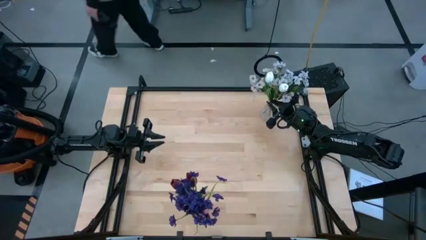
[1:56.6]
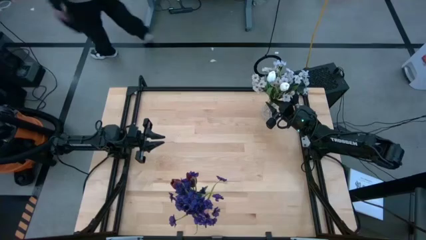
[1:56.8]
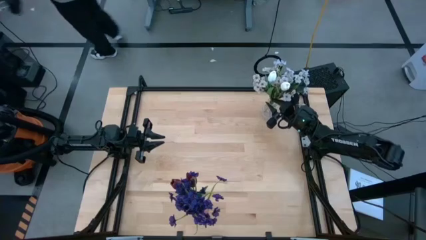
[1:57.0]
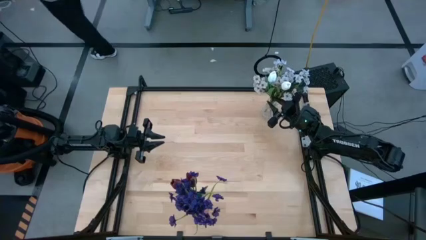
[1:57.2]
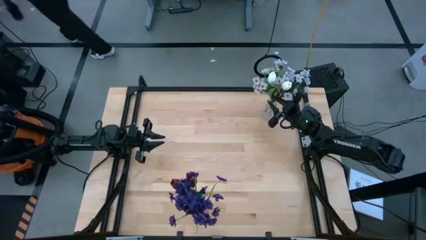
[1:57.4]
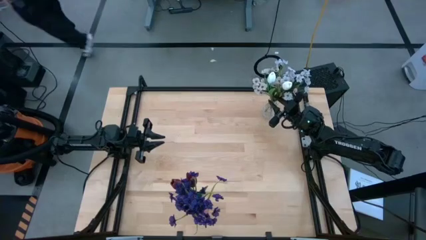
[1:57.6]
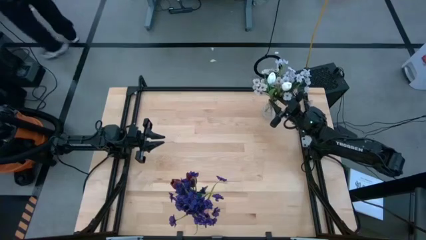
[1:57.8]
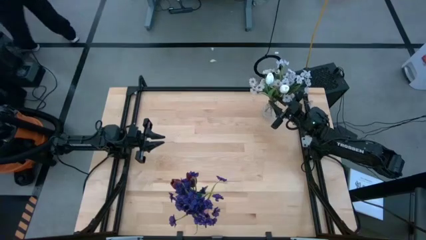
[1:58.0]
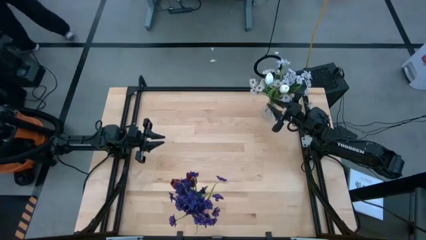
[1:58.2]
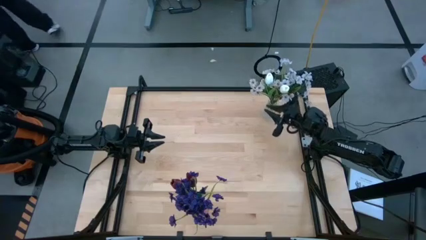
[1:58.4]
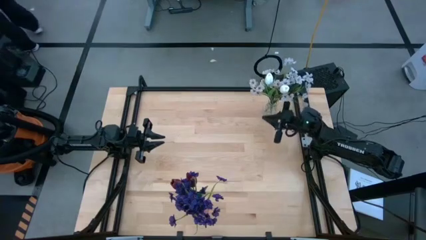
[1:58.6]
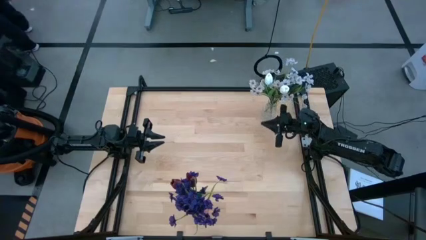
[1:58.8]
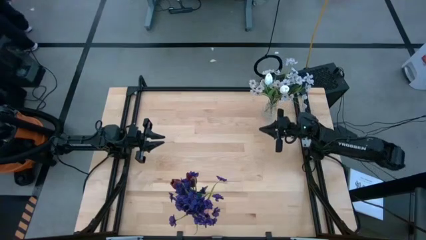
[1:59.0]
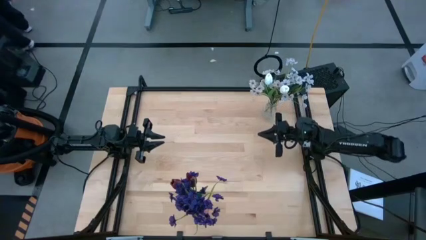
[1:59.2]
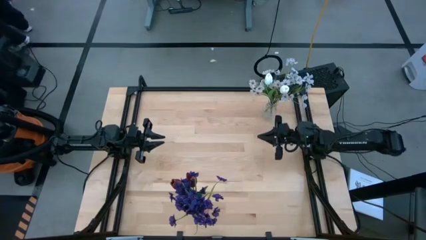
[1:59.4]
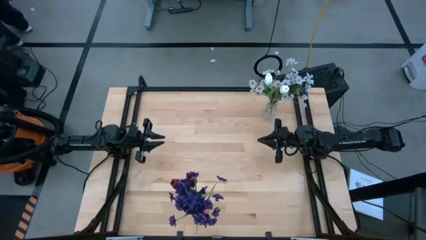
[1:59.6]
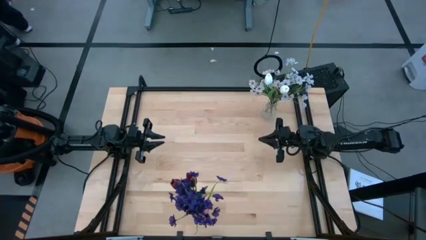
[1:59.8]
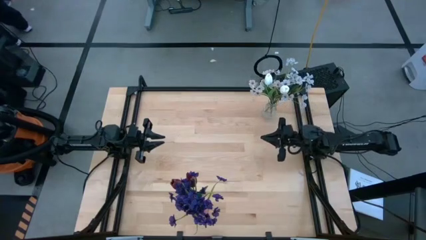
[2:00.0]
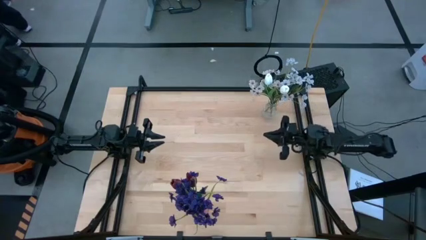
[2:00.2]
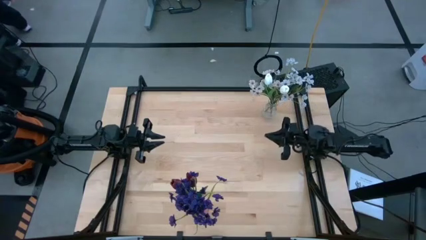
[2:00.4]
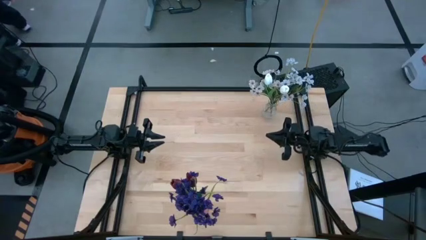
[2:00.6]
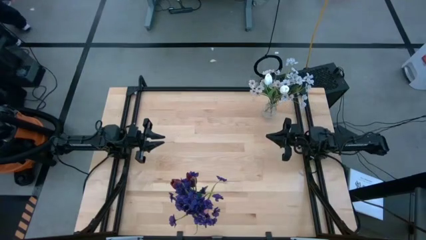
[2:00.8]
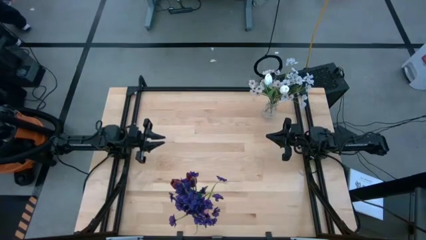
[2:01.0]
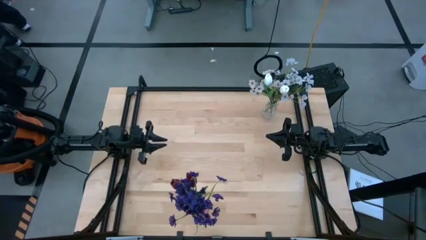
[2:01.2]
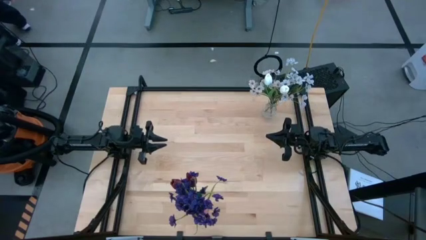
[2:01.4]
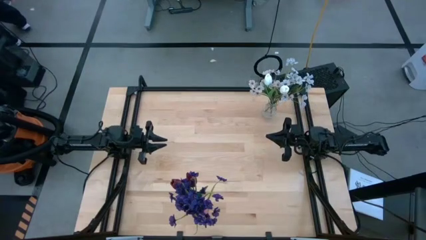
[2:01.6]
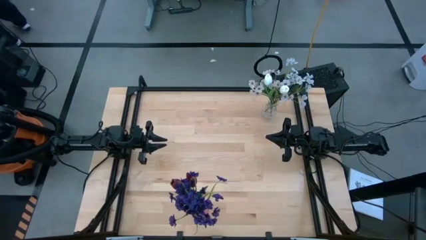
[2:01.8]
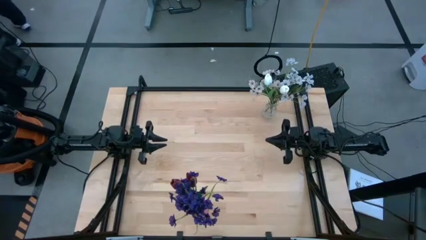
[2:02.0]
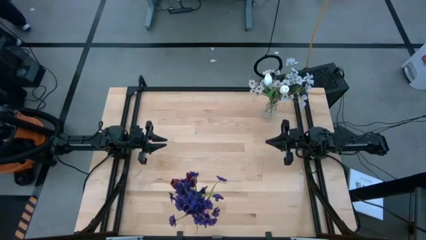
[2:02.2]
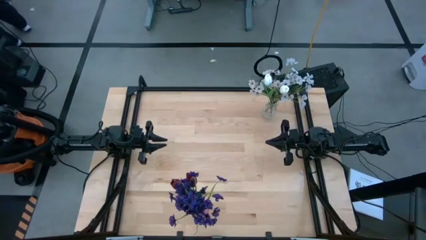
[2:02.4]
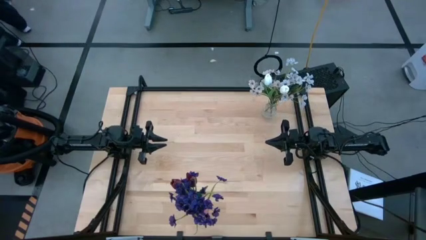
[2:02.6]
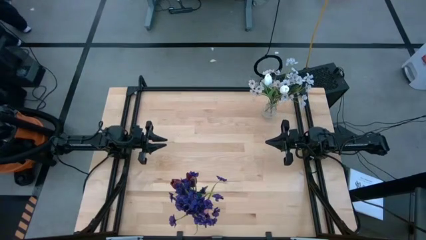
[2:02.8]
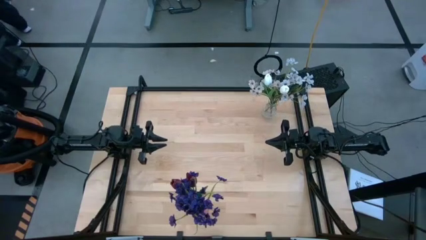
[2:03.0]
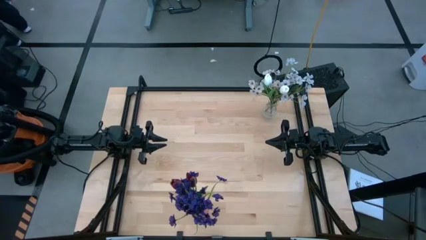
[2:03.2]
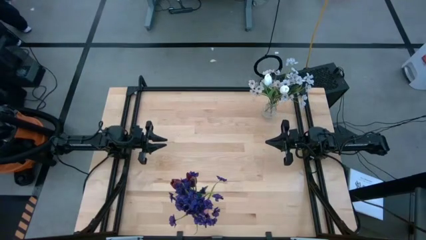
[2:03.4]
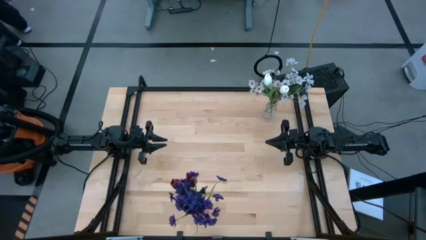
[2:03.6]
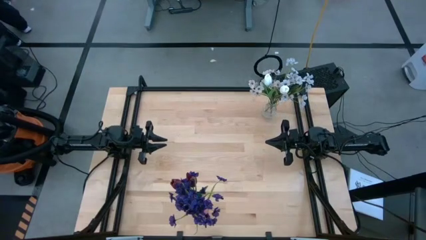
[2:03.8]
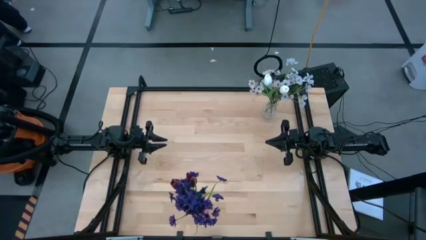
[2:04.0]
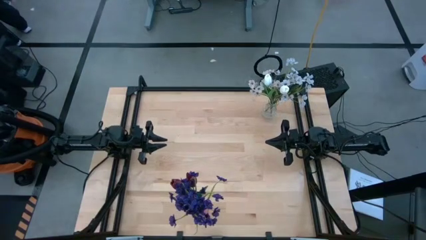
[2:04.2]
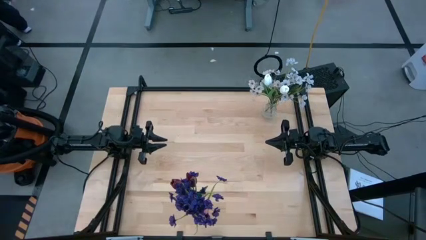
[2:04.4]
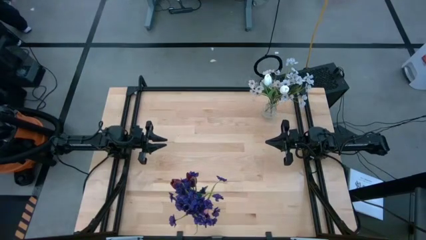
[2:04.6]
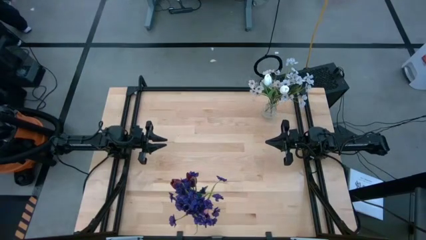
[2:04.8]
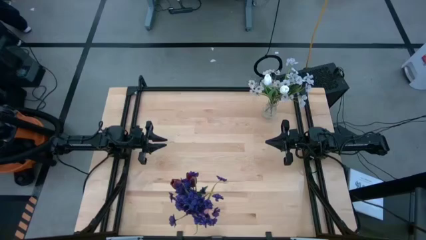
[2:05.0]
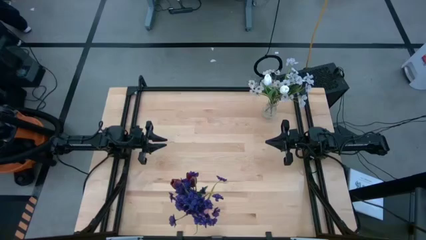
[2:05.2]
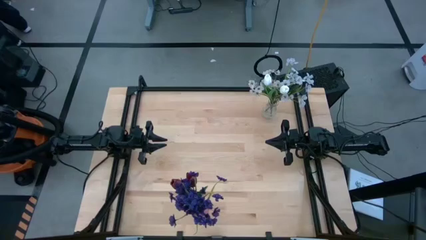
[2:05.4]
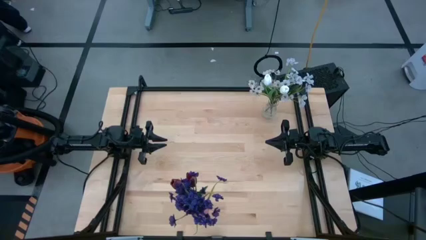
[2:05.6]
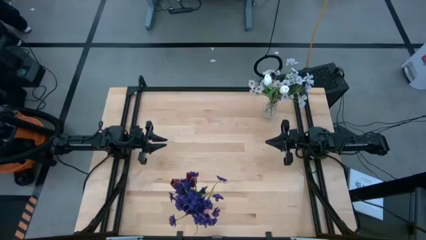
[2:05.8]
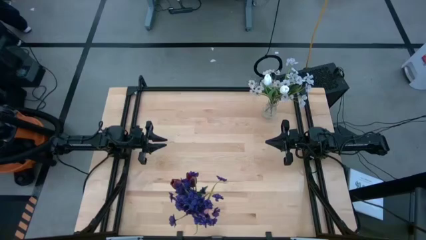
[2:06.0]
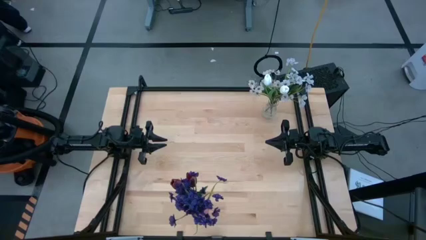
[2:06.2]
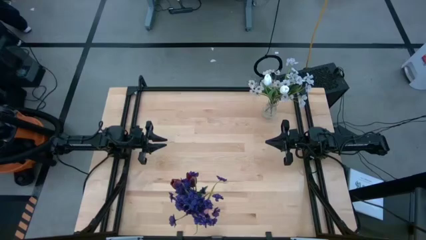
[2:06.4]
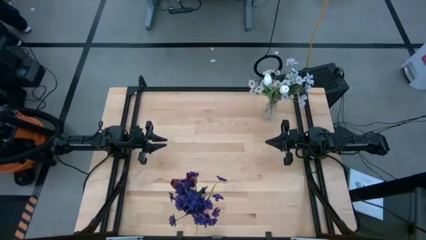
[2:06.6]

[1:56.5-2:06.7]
Task: Sort flowers into vase by color
Return to Home position

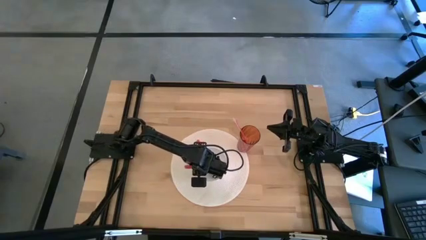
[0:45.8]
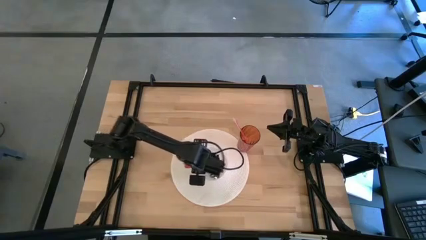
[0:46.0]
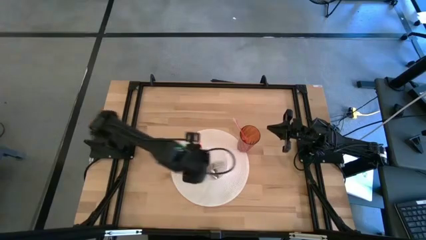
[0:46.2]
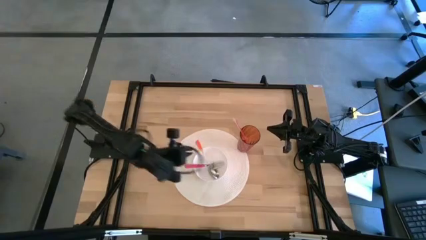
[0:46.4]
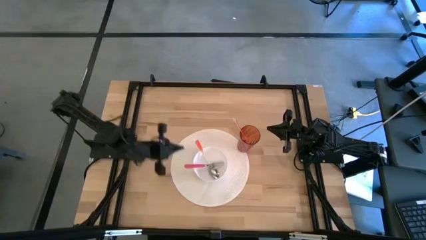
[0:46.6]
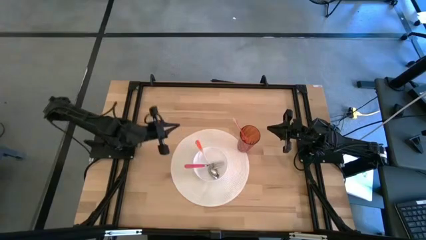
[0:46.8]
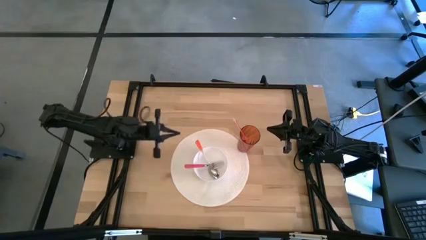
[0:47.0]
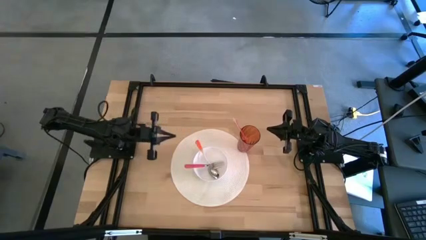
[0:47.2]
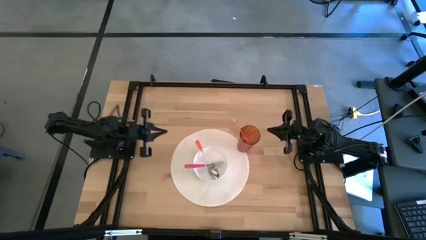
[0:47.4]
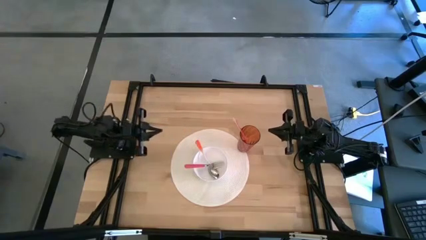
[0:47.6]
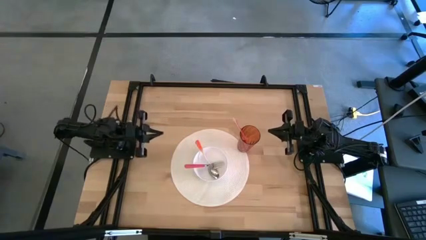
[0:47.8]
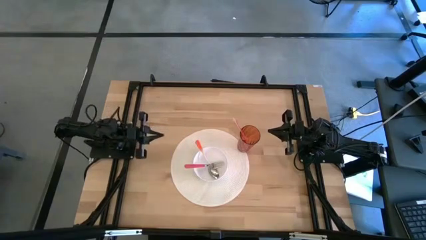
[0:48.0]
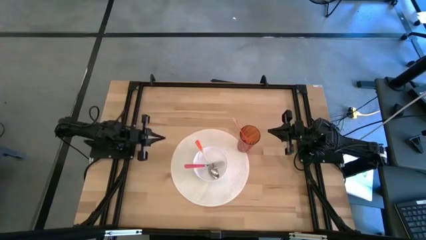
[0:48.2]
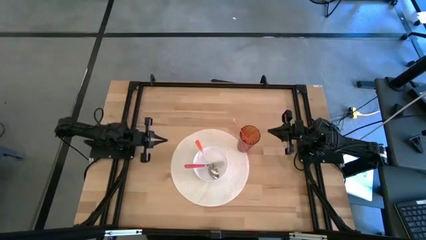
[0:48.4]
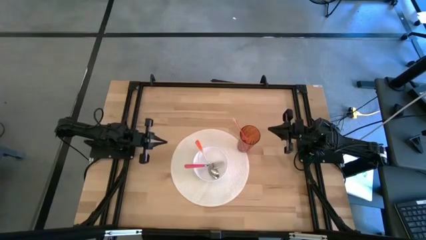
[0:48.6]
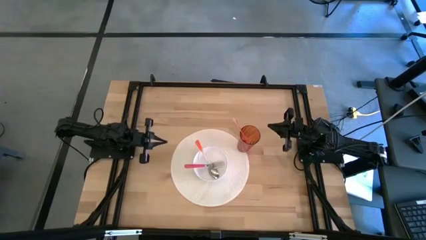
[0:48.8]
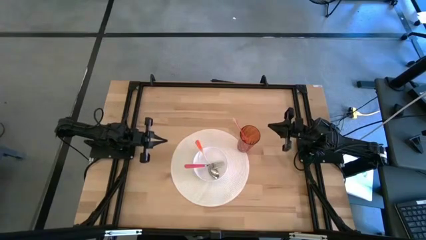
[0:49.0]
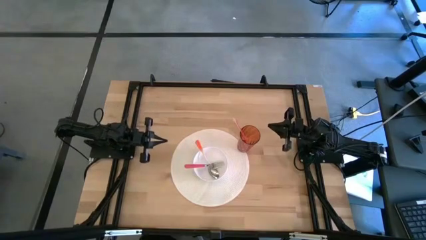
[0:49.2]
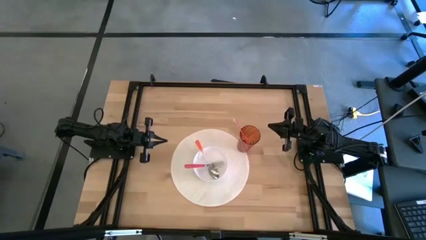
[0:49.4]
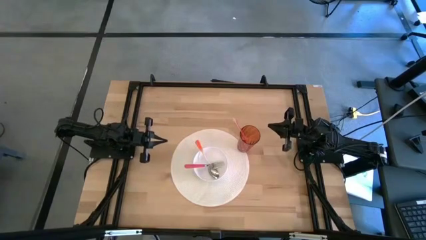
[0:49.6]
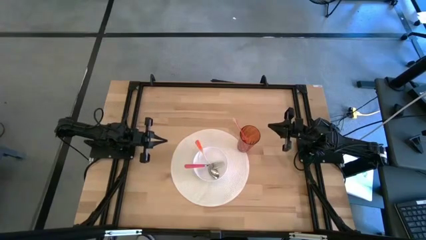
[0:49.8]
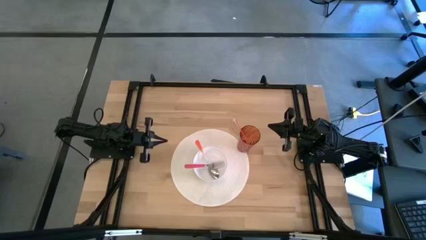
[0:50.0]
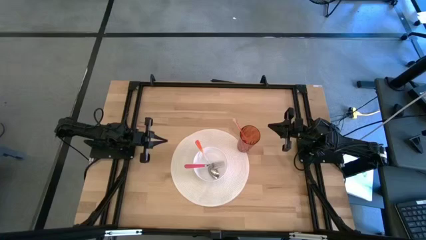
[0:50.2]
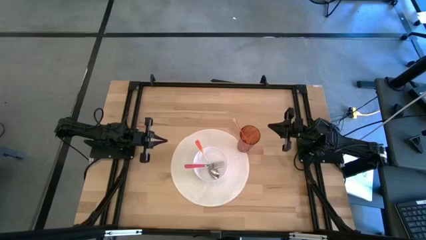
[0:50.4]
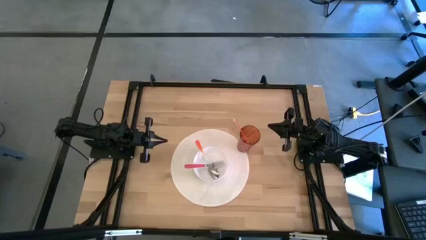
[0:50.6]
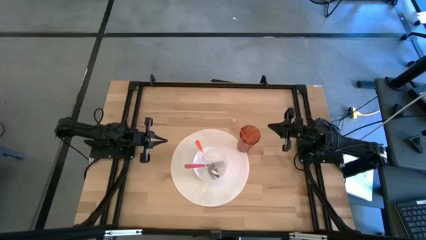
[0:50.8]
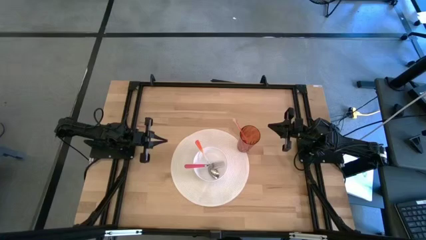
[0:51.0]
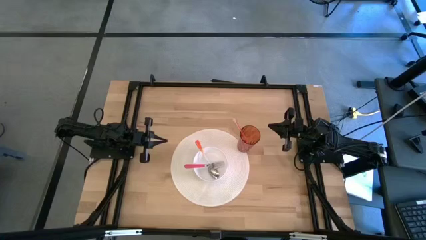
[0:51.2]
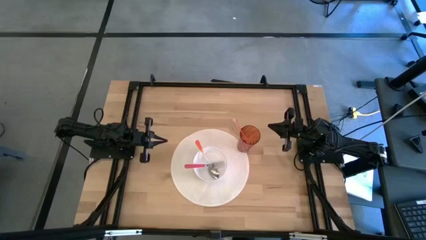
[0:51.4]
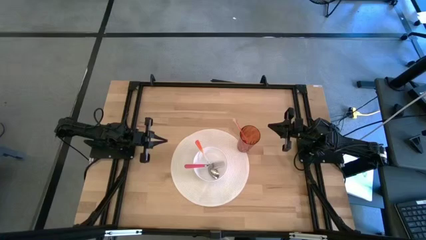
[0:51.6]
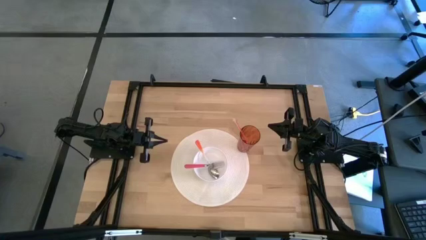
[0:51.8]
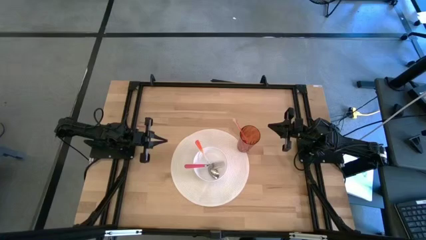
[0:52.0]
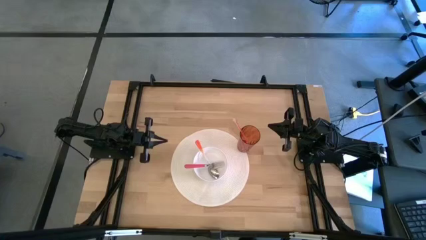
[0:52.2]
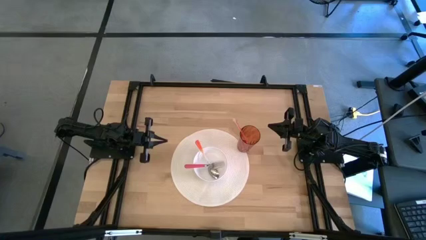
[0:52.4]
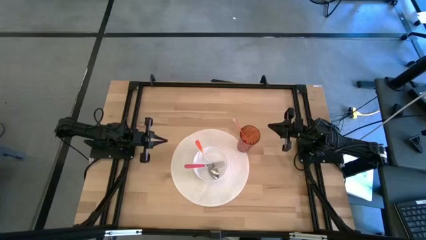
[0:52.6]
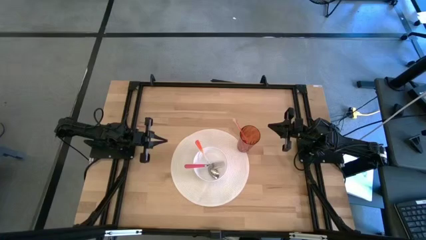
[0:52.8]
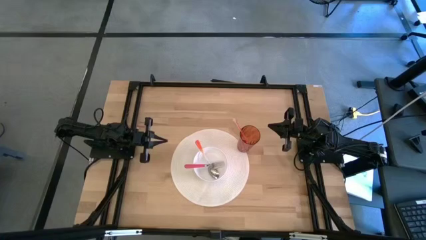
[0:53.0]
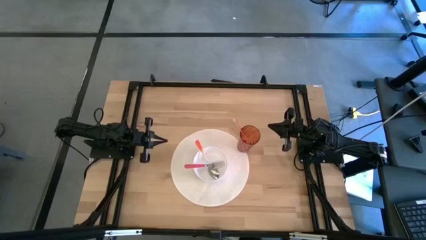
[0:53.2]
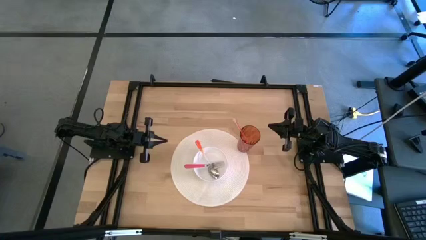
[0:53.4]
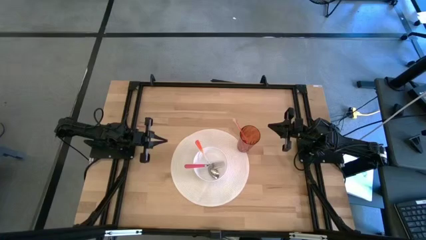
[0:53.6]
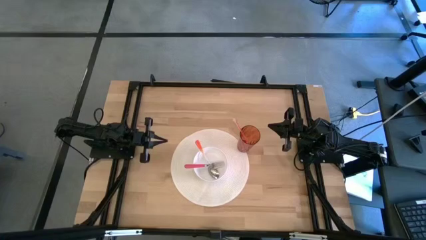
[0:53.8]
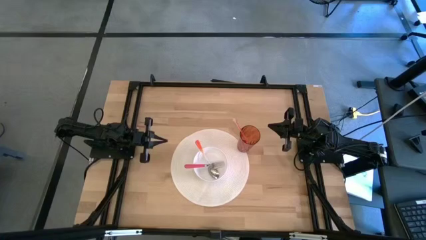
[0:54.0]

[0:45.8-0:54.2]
Task: Pick & Place Utensil
Return to Home Position
